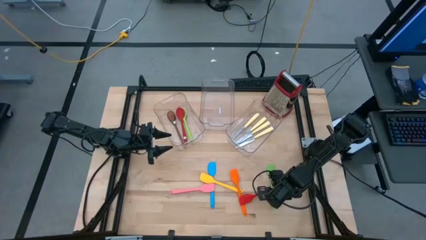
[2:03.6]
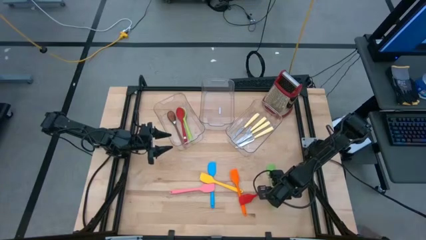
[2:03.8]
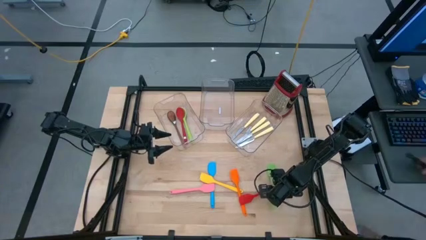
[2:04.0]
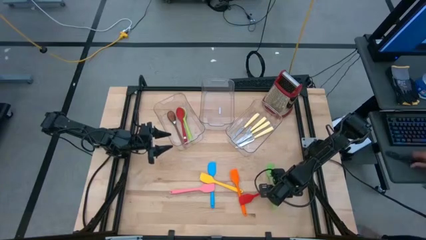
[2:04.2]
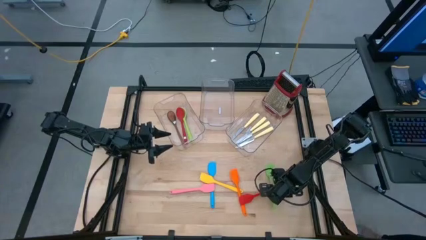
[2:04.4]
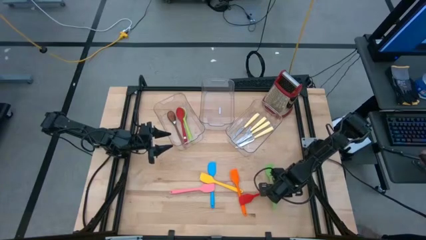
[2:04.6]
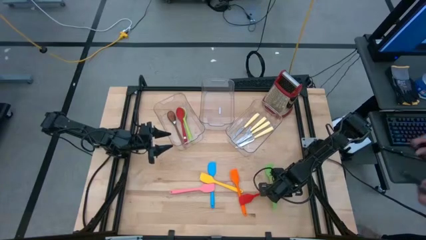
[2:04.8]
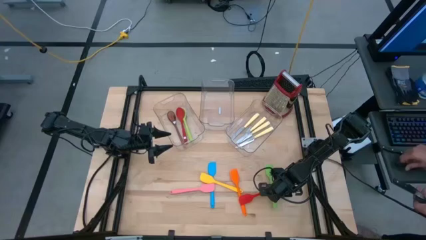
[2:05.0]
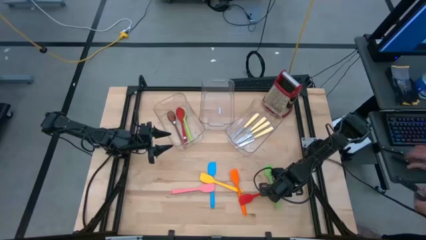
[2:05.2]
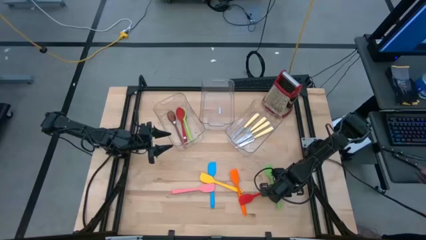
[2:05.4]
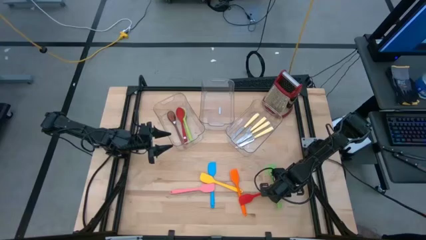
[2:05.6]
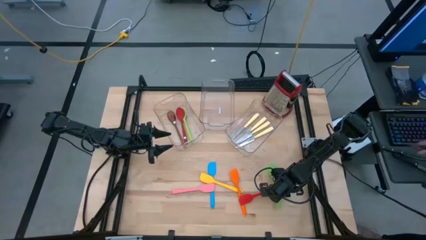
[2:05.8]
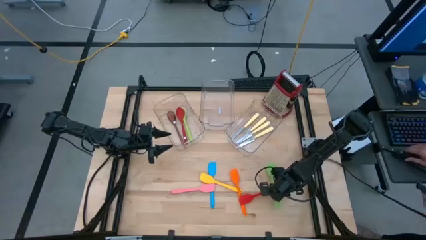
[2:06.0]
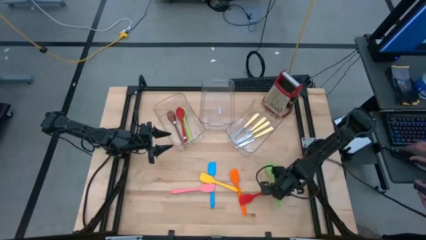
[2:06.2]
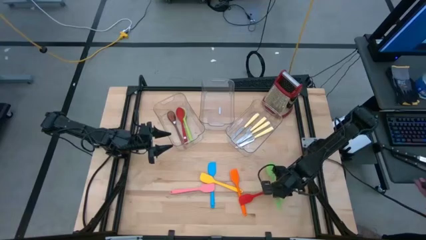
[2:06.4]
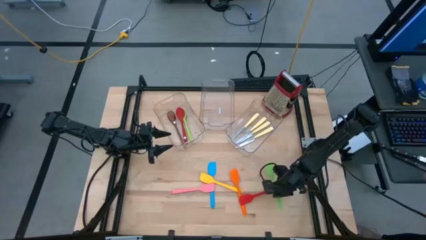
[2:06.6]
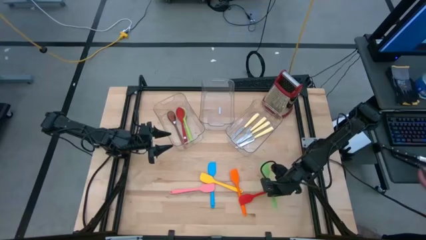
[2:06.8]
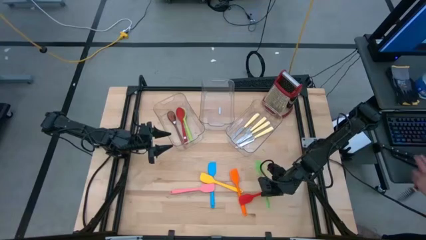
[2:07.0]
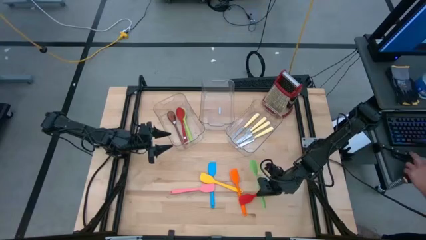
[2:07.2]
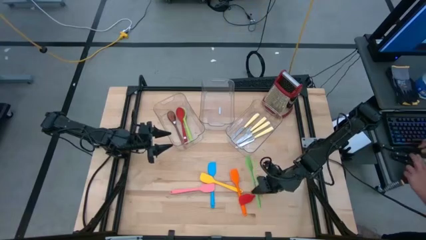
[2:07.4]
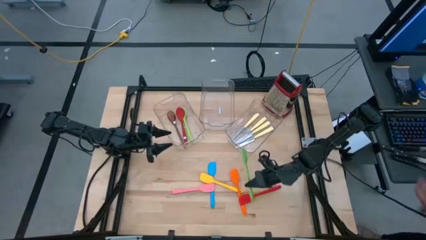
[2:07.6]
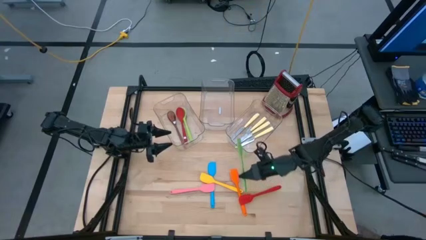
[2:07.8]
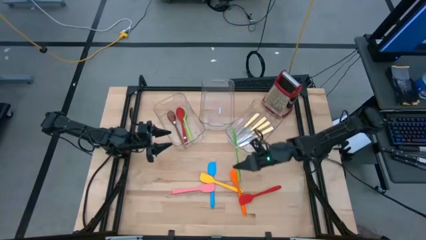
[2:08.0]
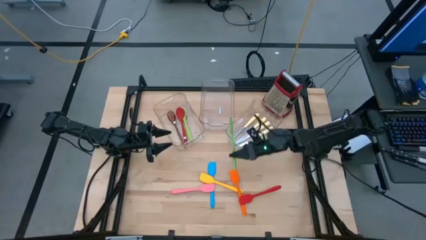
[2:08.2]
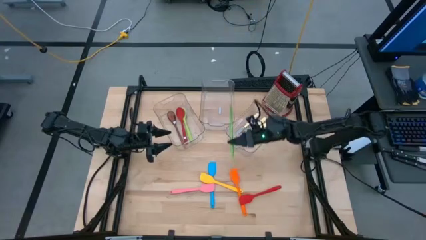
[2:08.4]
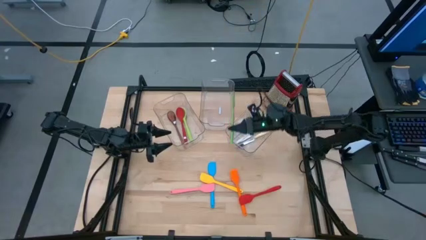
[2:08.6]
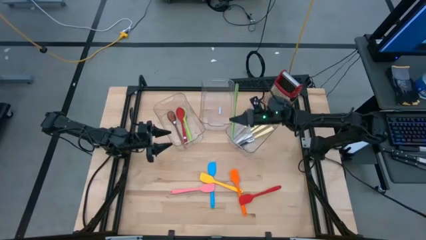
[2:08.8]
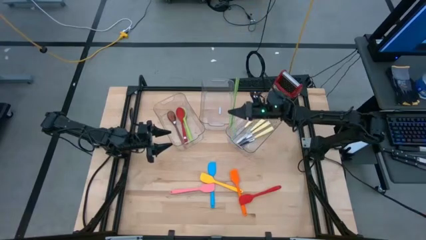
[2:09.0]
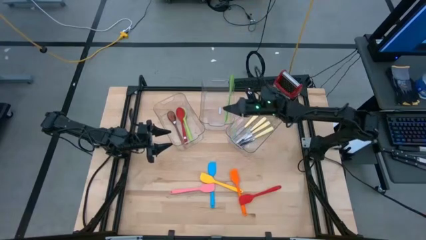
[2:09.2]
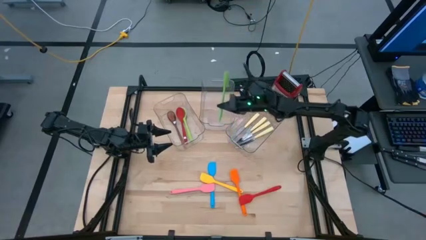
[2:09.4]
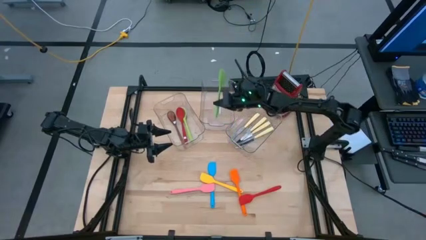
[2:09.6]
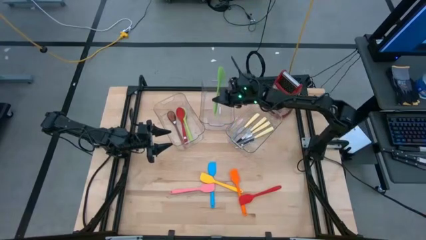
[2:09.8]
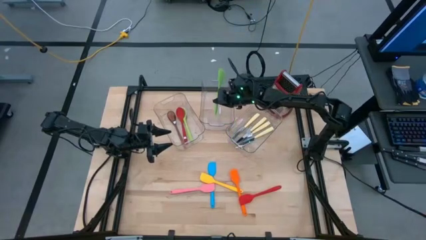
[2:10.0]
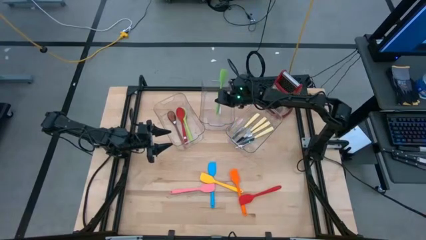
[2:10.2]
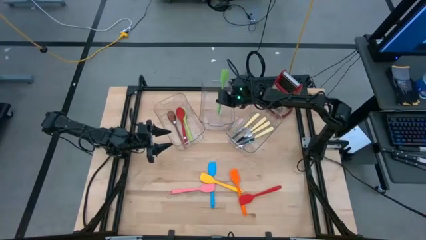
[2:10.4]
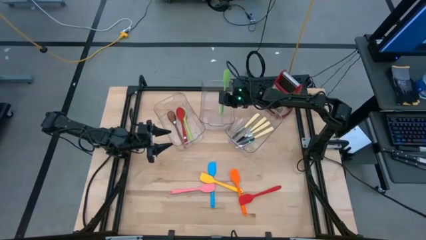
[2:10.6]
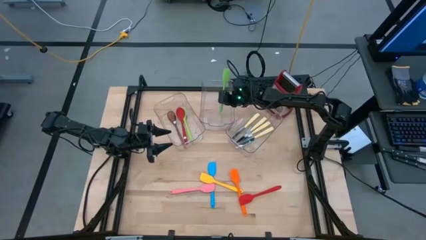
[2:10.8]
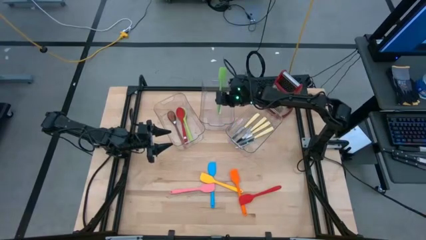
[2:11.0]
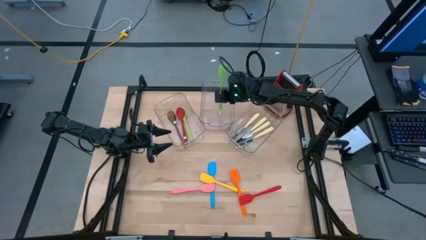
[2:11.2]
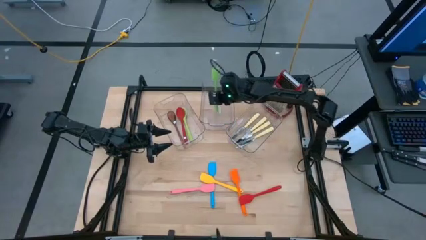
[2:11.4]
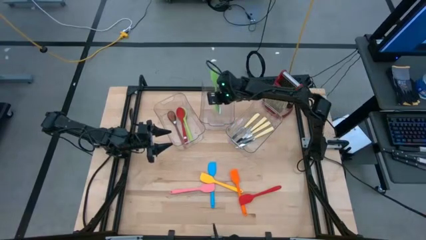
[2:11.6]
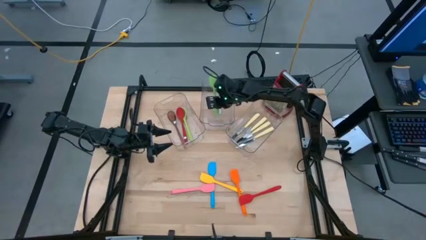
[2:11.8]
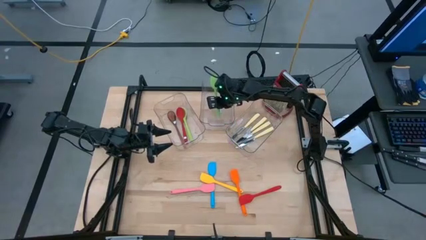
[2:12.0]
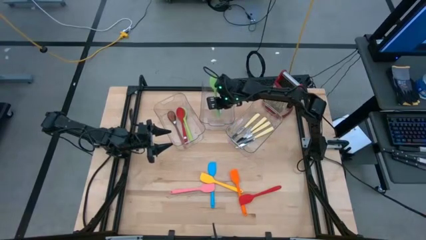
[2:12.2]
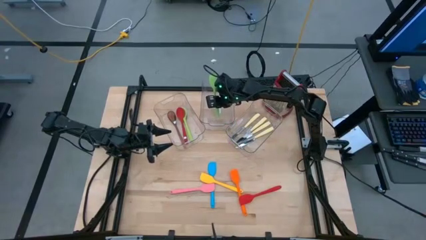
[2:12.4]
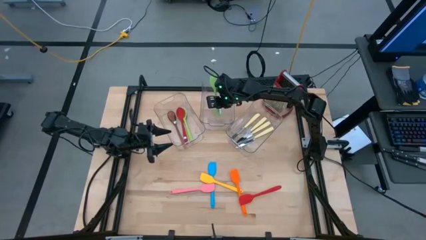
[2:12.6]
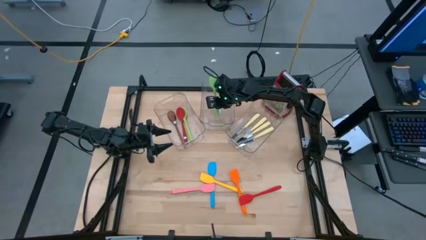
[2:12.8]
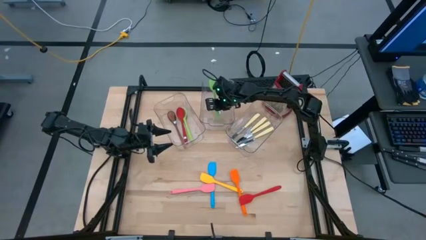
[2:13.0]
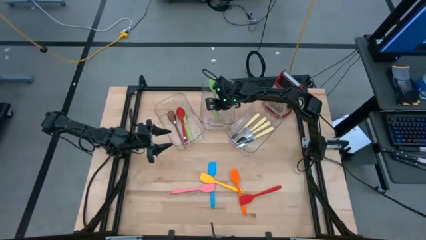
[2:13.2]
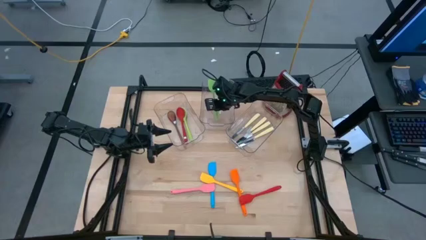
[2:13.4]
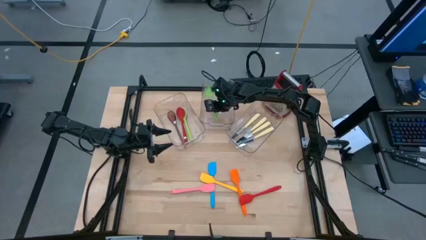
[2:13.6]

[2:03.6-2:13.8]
Task: Pick & Place Kitchen Items
Put the green spatula into the middle transparent bin

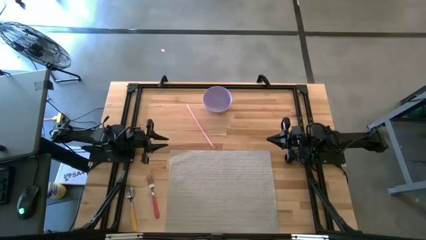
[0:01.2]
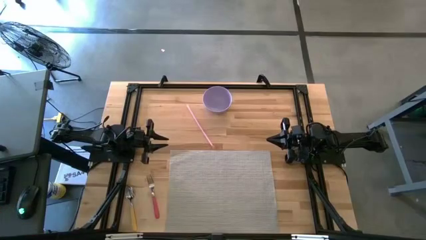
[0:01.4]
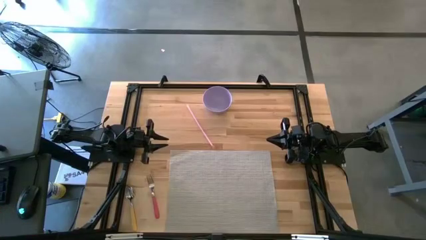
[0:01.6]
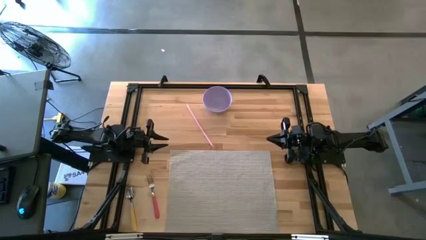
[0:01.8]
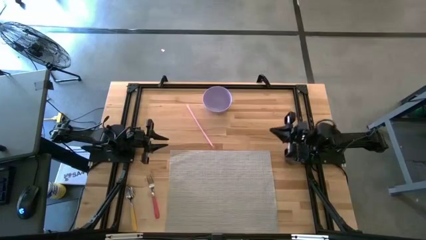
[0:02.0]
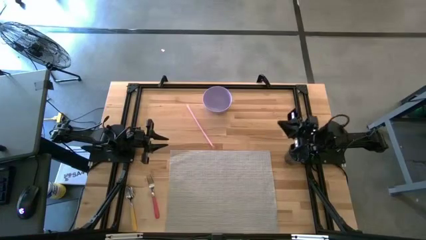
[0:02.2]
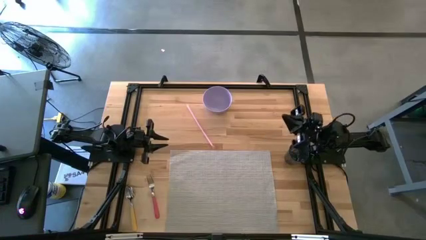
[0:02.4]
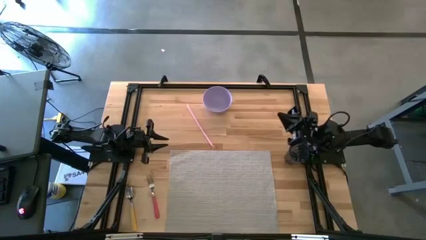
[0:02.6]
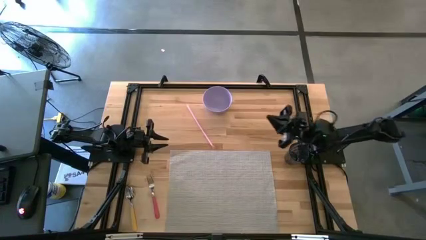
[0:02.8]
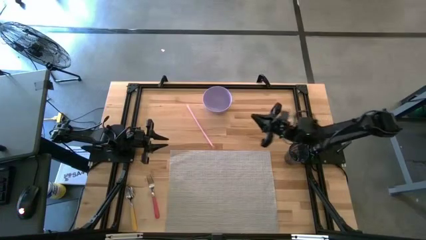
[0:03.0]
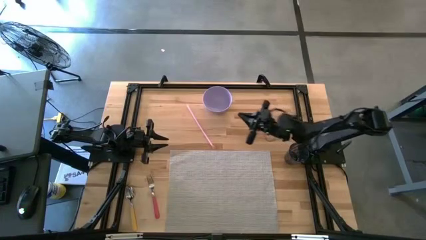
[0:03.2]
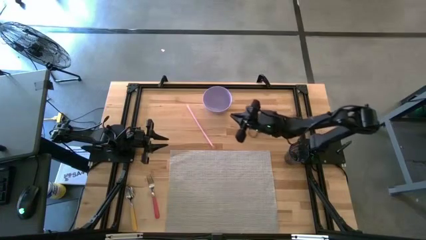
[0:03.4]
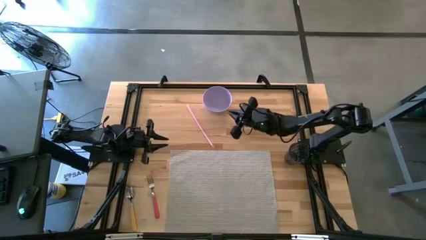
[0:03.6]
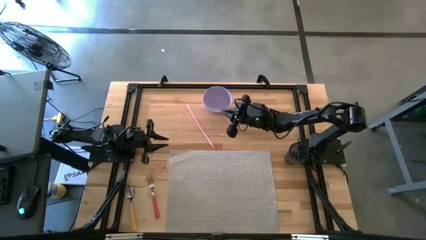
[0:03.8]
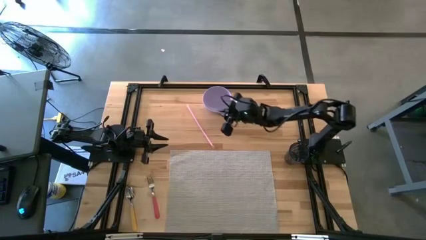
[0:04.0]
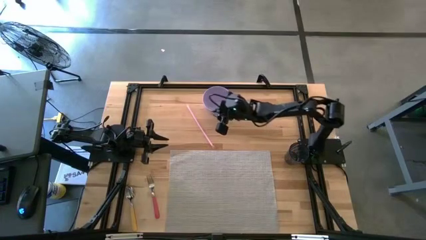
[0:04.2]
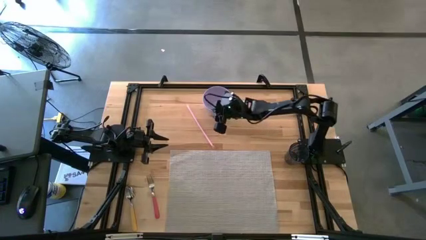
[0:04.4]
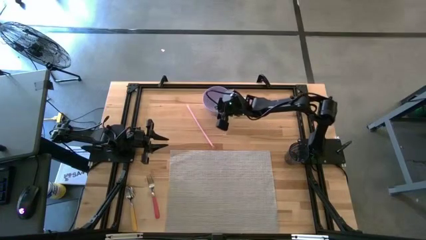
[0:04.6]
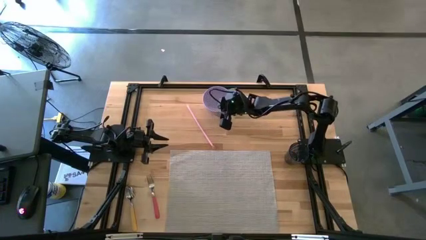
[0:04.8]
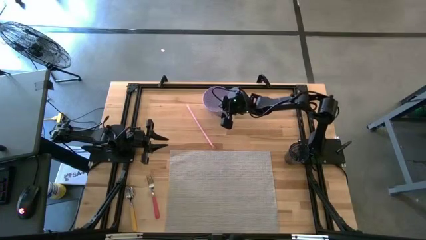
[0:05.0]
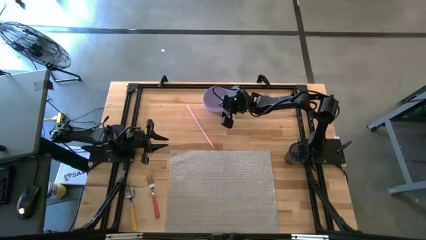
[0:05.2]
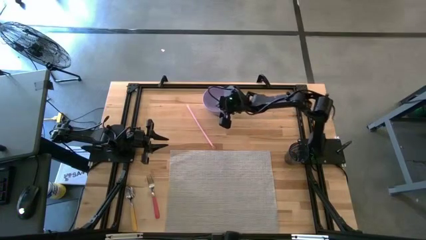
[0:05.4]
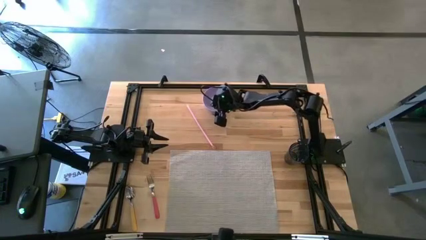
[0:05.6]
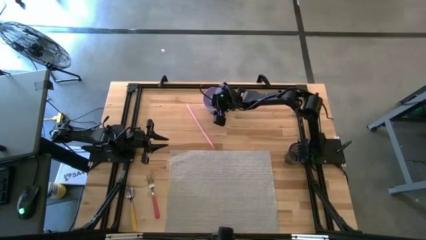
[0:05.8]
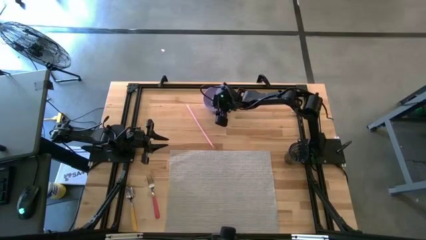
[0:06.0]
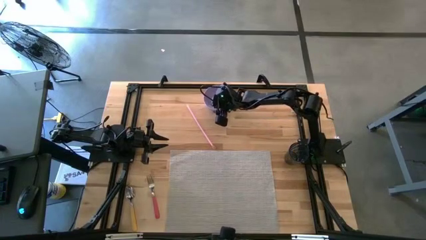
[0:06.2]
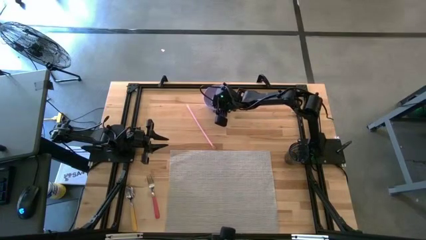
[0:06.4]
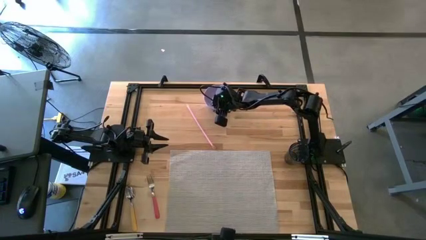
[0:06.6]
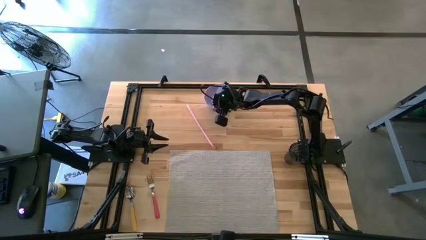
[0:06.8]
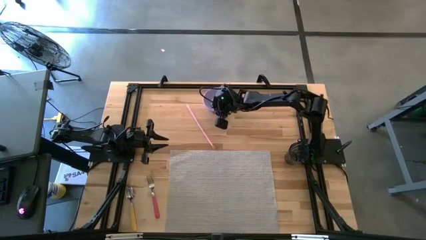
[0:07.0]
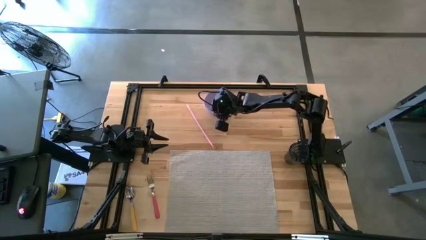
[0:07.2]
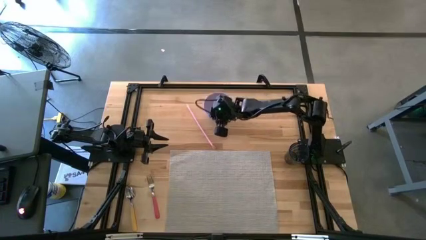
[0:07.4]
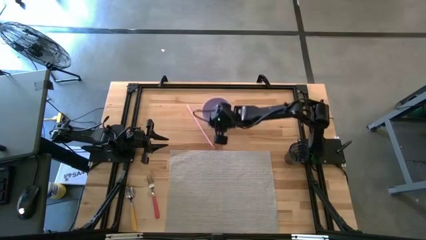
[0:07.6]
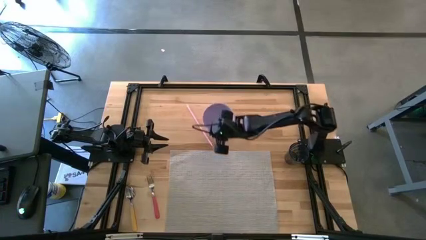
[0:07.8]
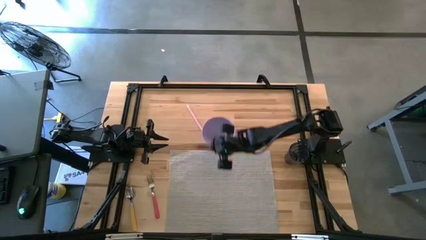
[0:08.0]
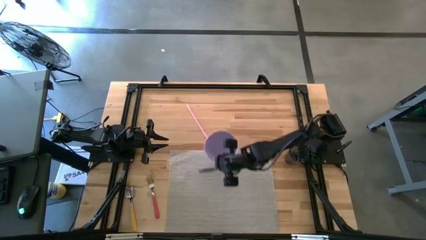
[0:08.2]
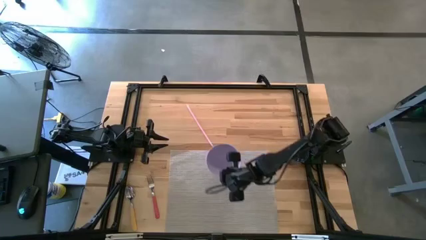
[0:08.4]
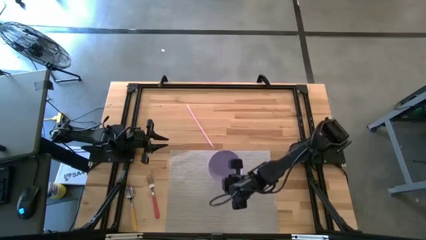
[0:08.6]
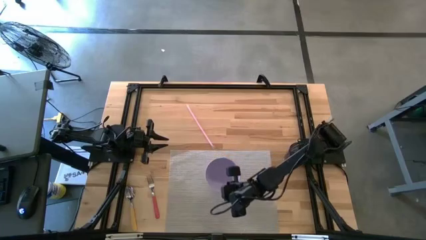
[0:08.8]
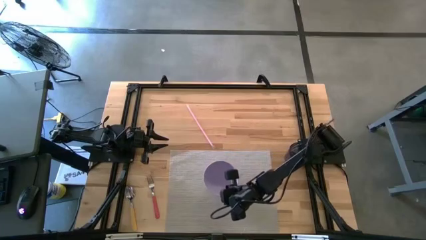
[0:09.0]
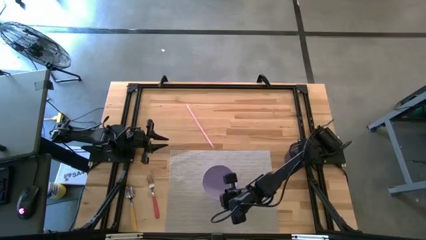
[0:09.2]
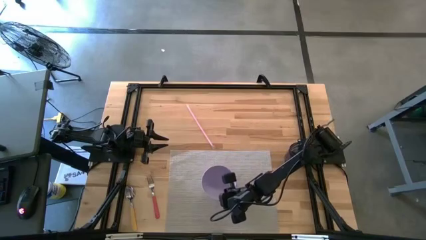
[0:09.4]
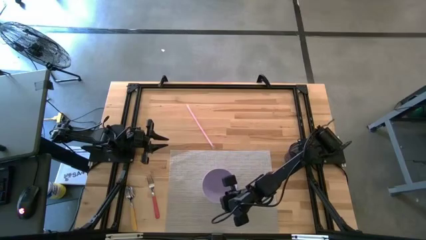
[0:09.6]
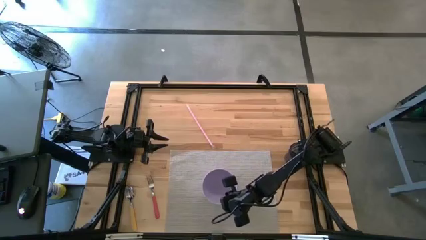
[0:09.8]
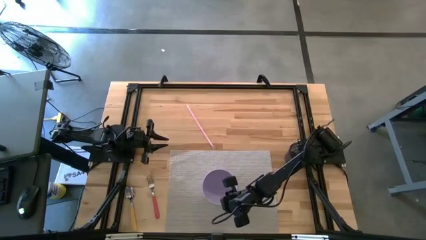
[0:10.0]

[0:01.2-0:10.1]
Task: Pick & Place Utensil
Put the purple bowl on the gray mat
